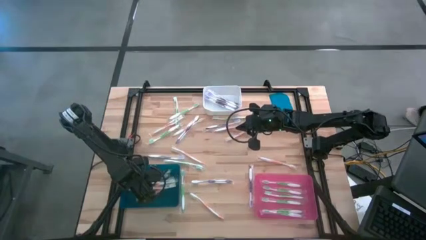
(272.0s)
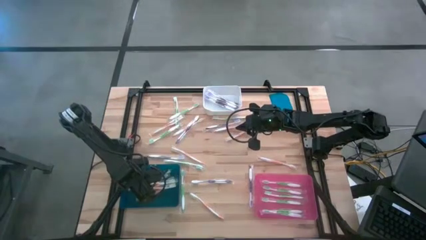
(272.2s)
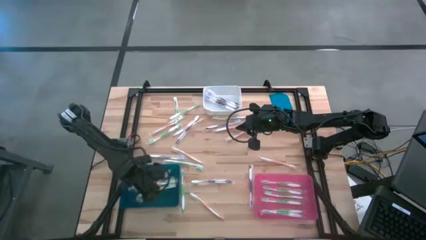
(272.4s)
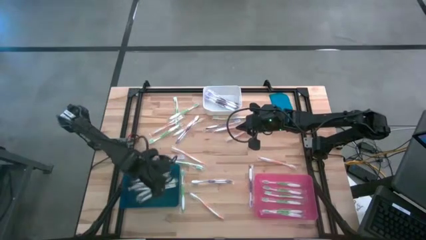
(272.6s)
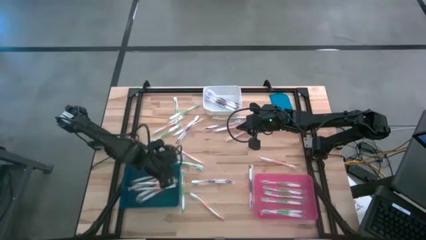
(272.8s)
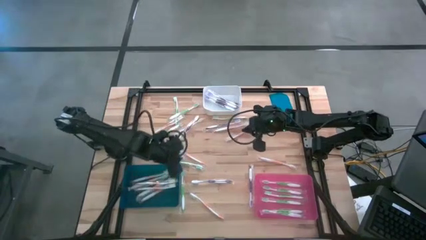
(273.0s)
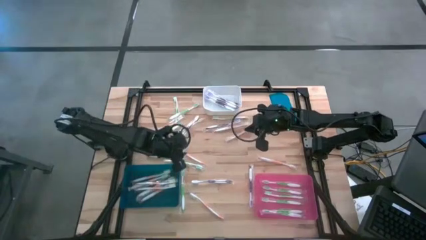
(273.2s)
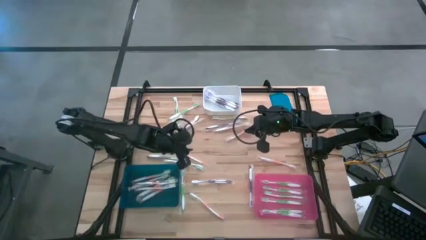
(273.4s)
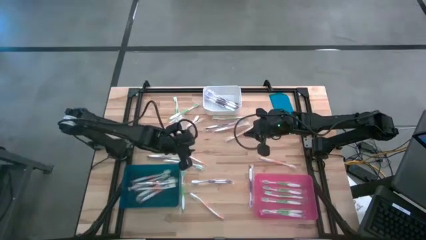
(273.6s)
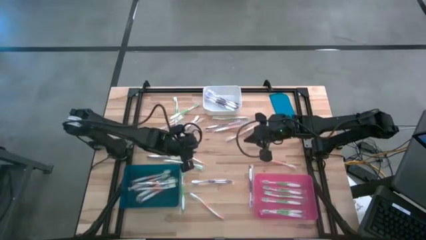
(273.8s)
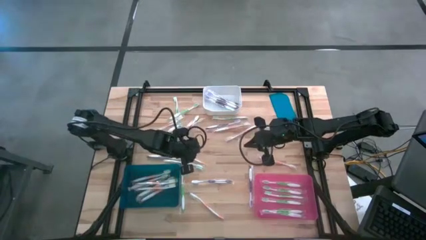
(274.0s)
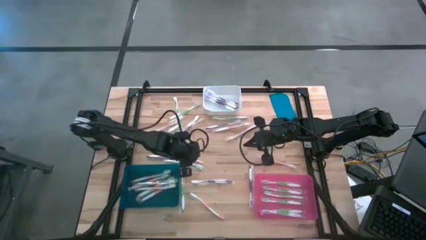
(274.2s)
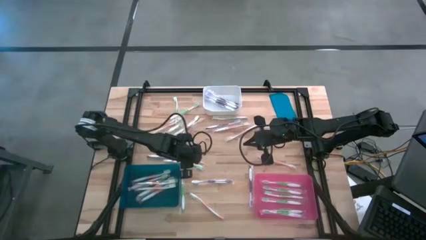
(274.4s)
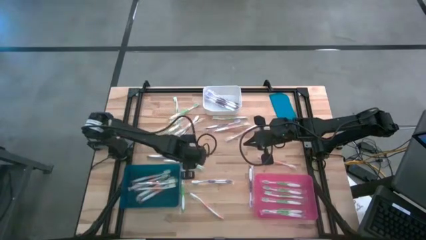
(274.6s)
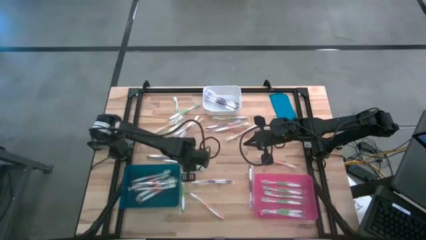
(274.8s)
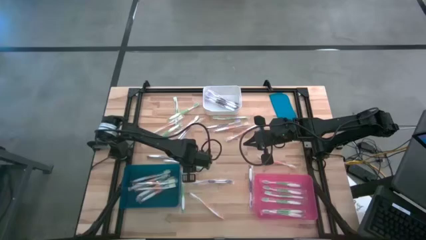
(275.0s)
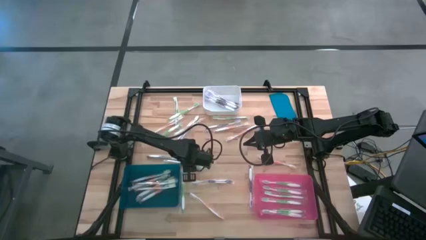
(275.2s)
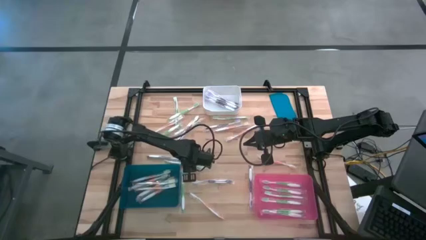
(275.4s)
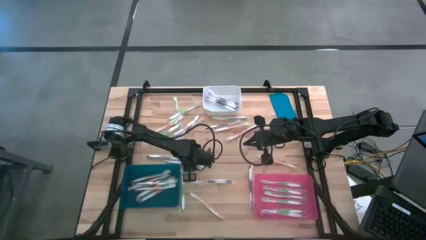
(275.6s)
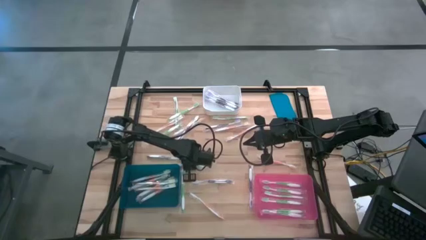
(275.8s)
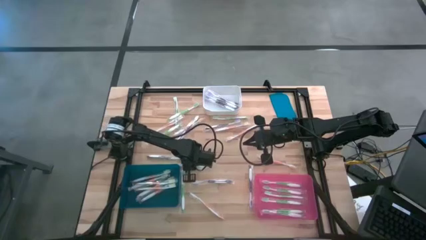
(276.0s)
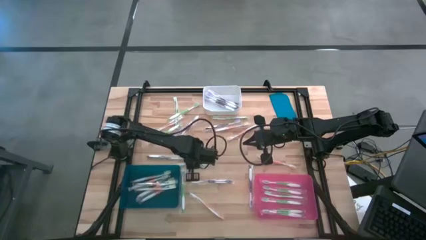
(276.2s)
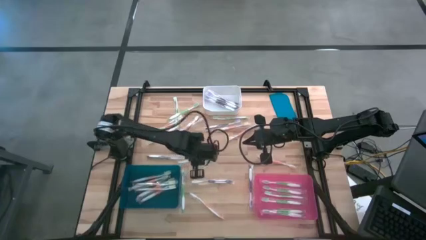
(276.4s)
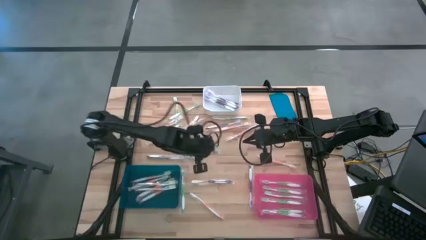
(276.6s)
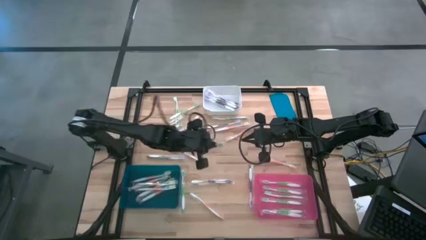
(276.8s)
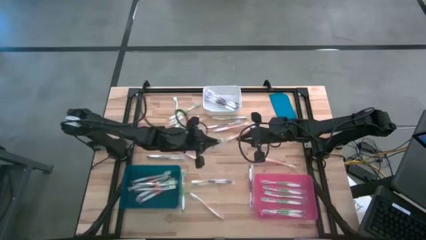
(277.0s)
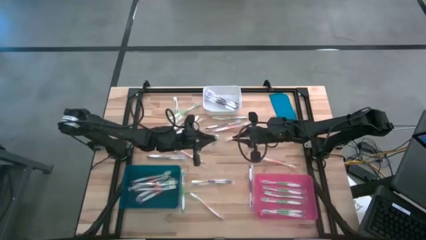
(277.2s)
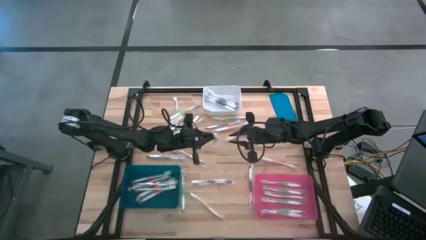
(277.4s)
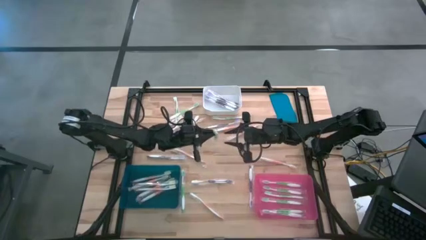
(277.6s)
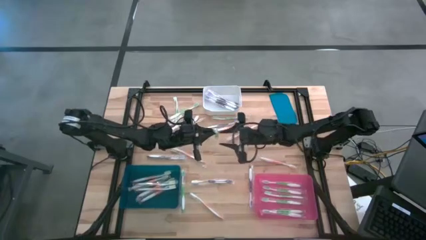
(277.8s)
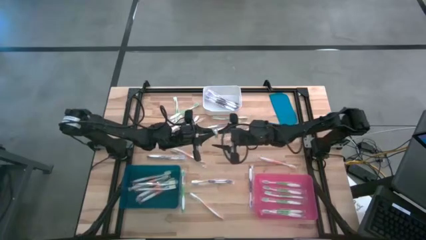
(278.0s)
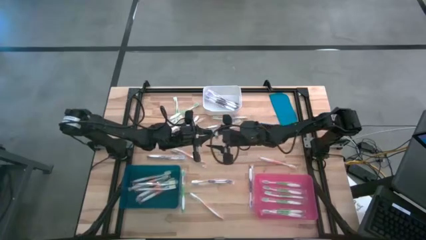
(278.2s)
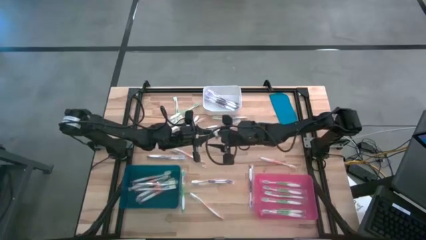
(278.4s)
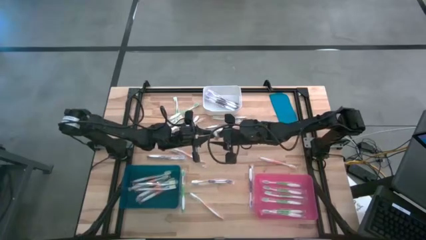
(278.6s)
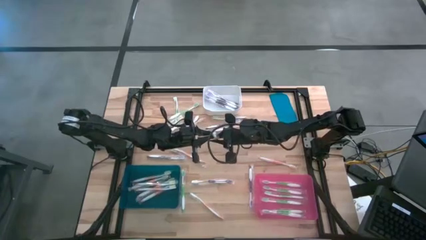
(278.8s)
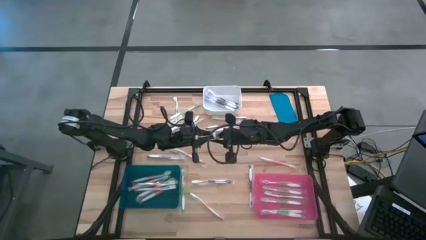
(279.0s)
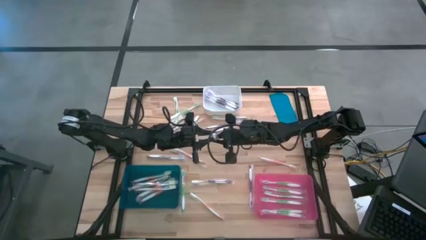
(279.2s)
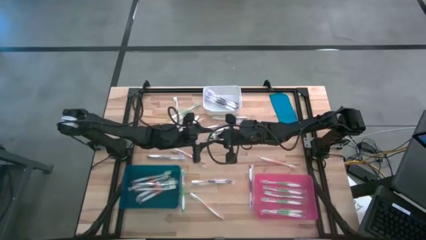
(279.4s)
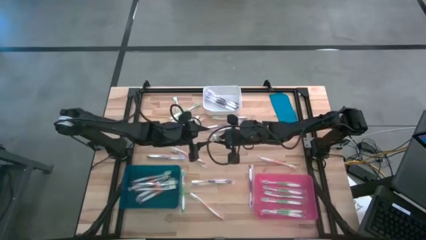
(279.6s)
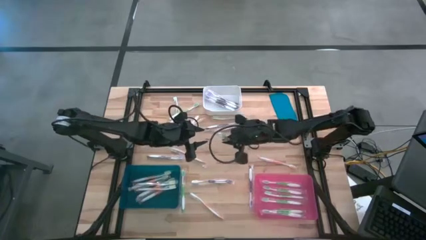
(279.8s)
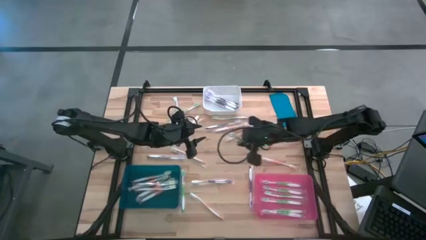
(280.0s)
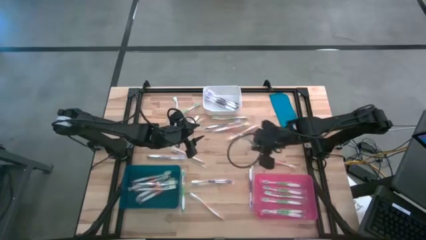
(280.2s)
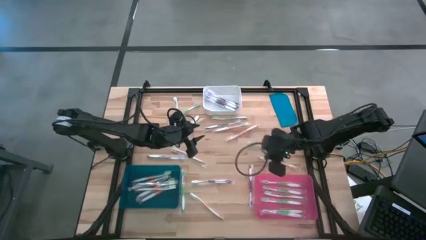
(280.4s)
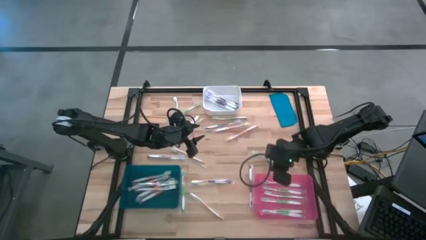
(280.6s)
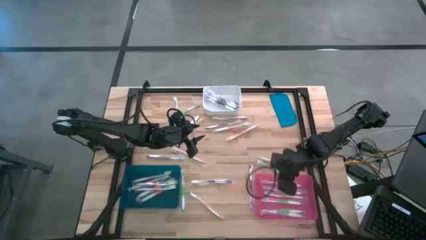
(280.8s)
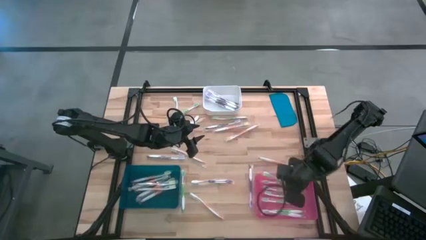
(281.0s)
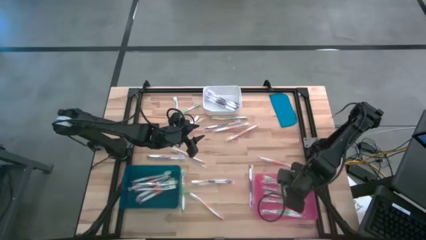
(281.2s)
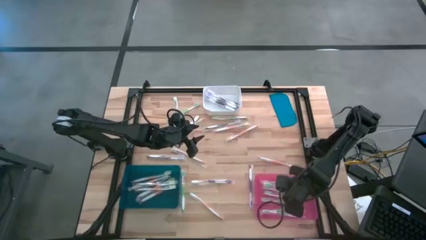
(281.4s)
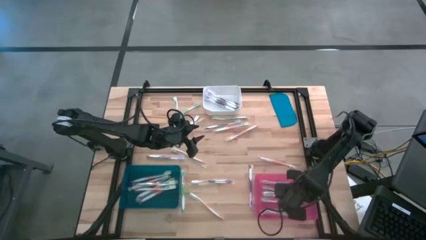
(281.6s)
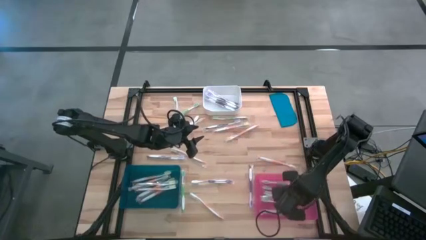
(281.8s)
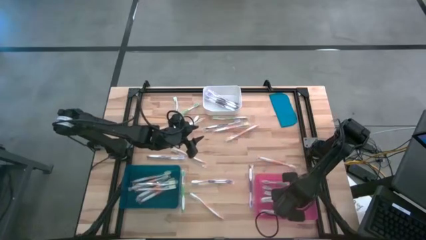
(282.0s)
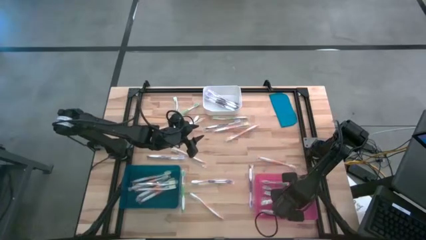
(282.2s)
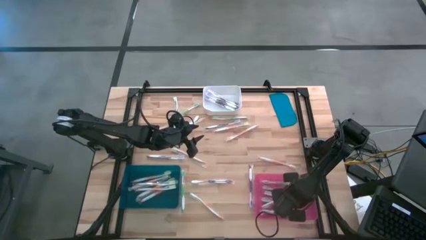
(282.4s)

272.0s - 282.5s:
Task: Pick & Place Toothbrushes
Put the green toothbrush into the pink bin
